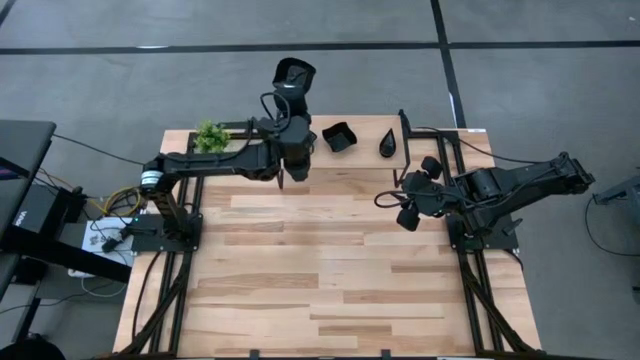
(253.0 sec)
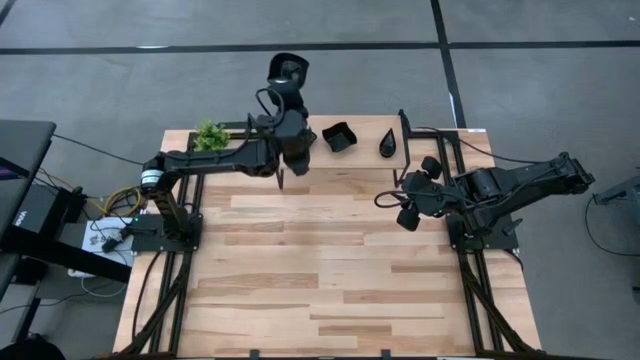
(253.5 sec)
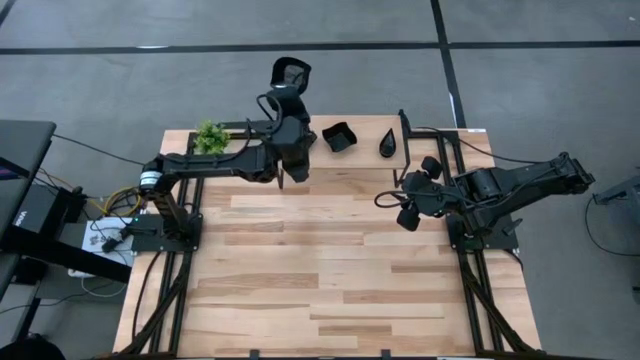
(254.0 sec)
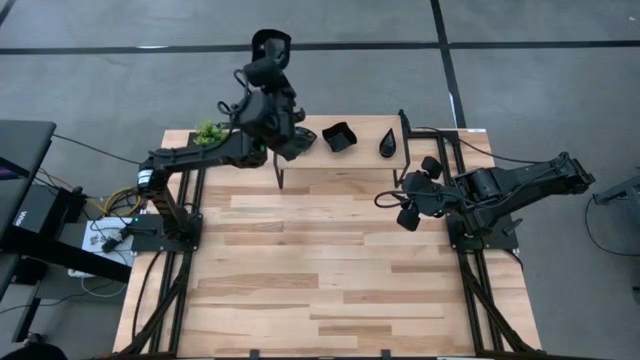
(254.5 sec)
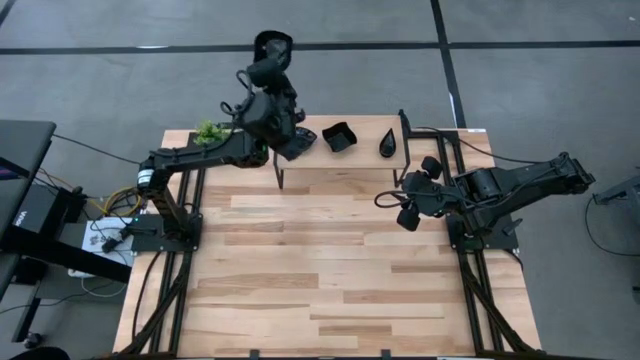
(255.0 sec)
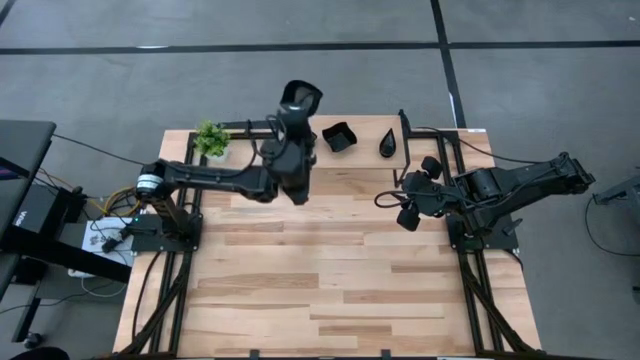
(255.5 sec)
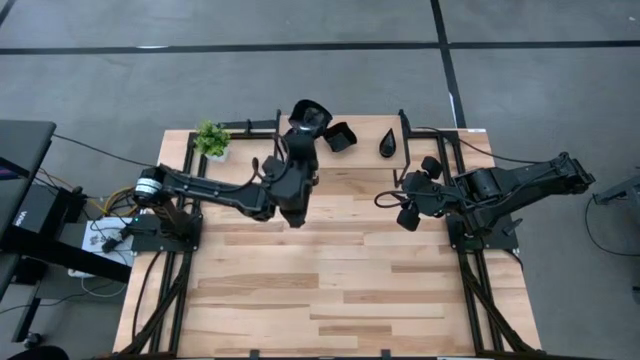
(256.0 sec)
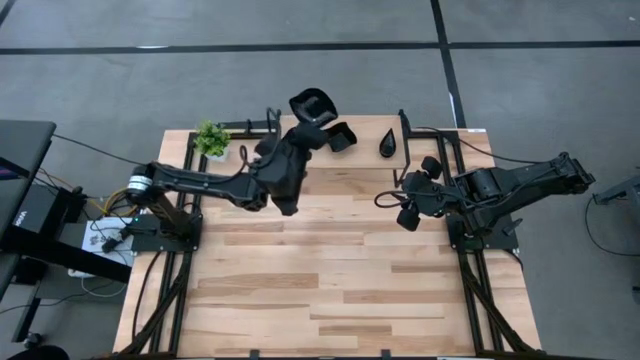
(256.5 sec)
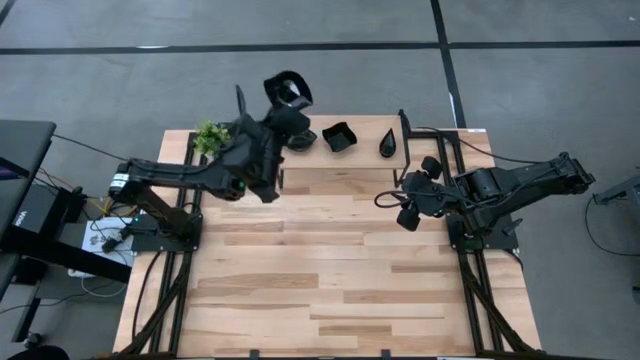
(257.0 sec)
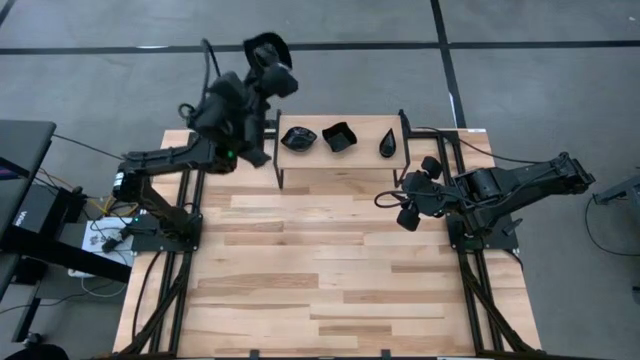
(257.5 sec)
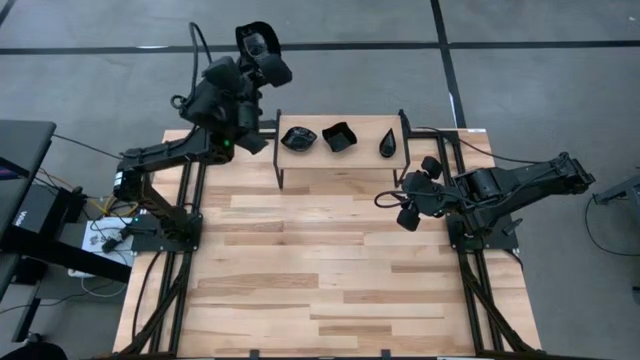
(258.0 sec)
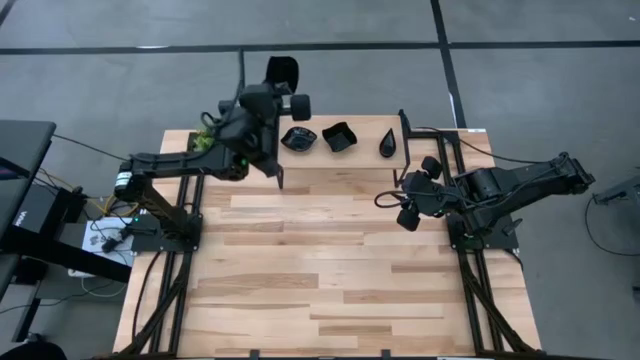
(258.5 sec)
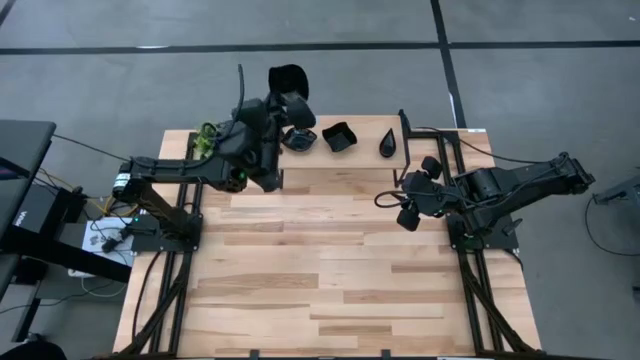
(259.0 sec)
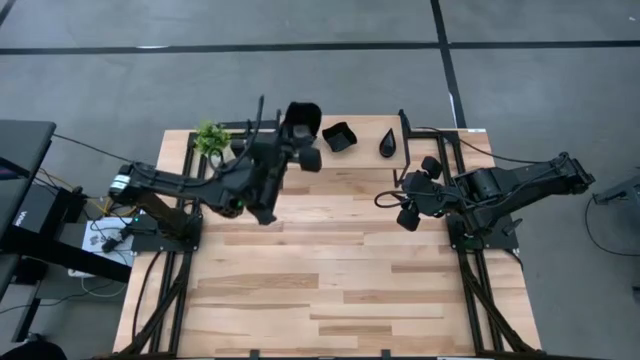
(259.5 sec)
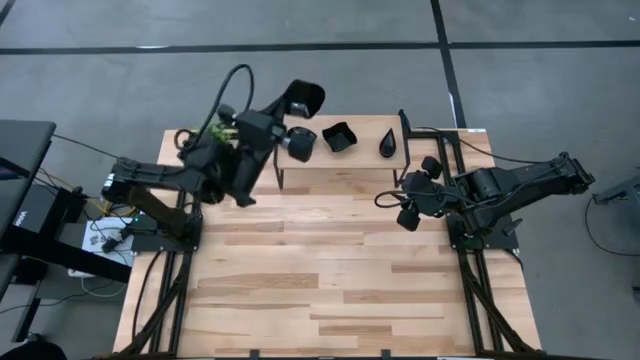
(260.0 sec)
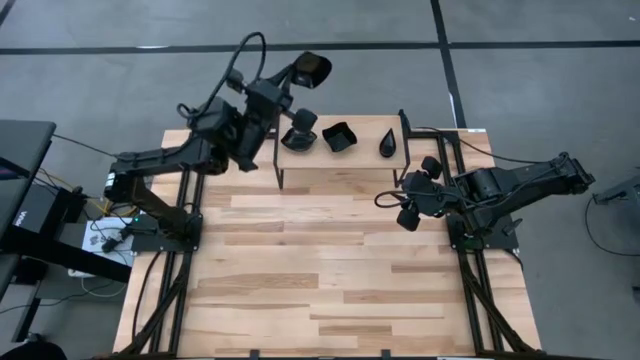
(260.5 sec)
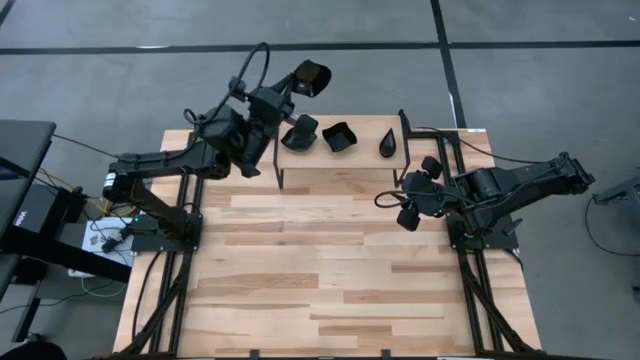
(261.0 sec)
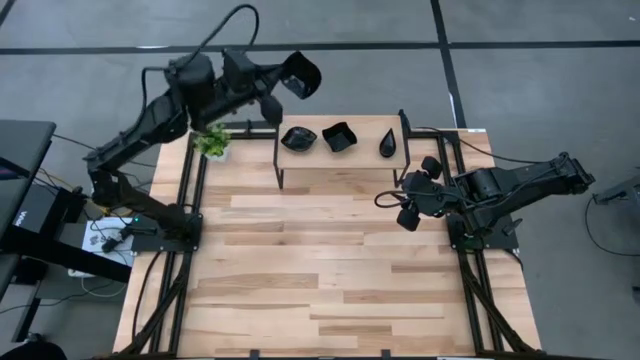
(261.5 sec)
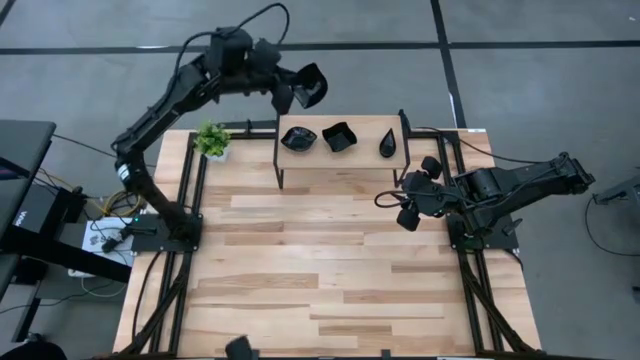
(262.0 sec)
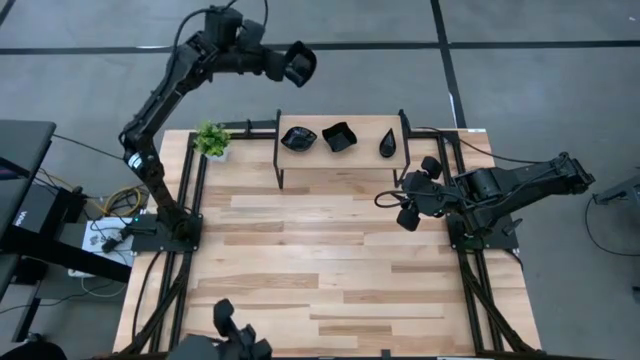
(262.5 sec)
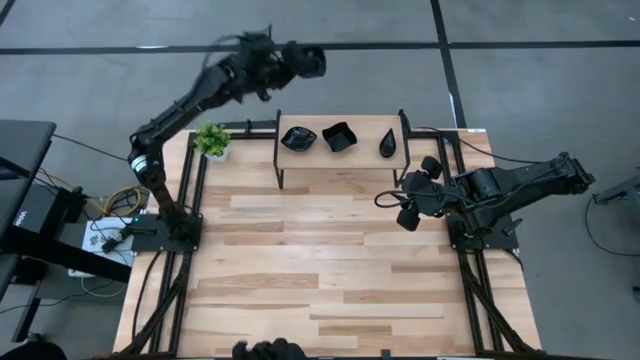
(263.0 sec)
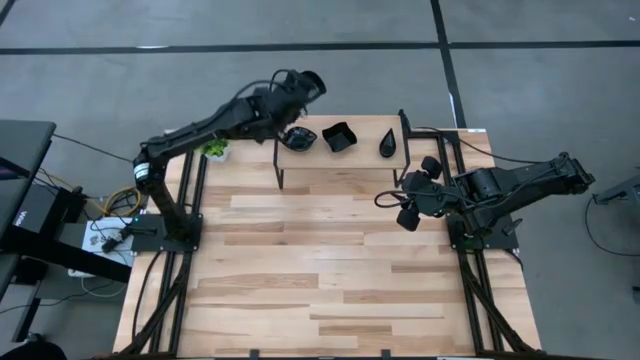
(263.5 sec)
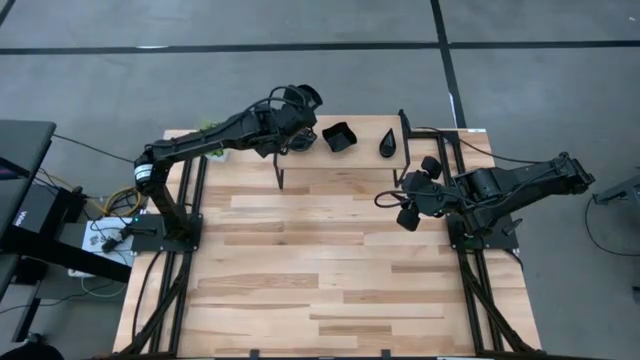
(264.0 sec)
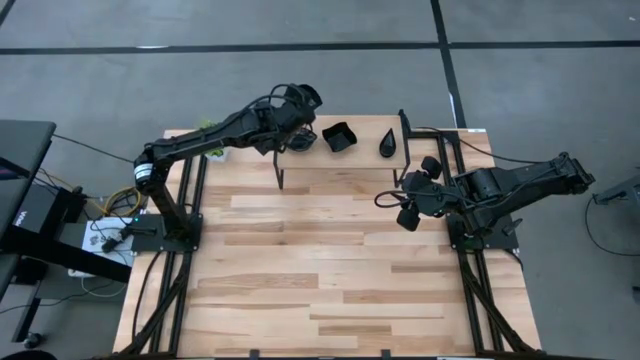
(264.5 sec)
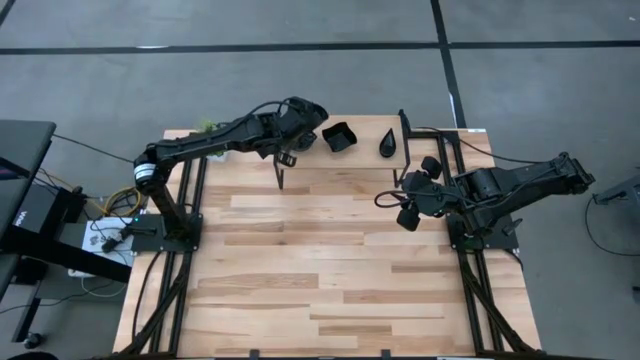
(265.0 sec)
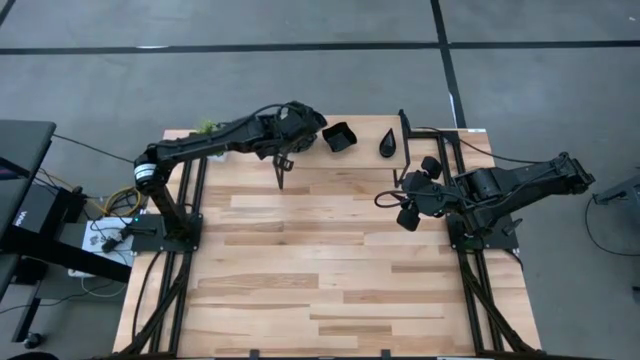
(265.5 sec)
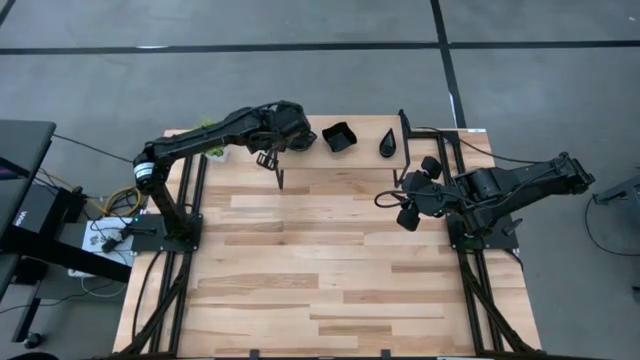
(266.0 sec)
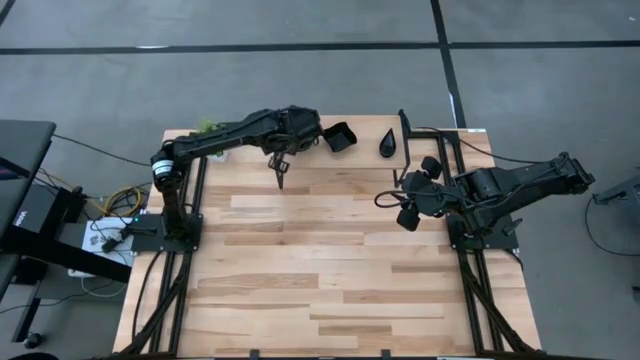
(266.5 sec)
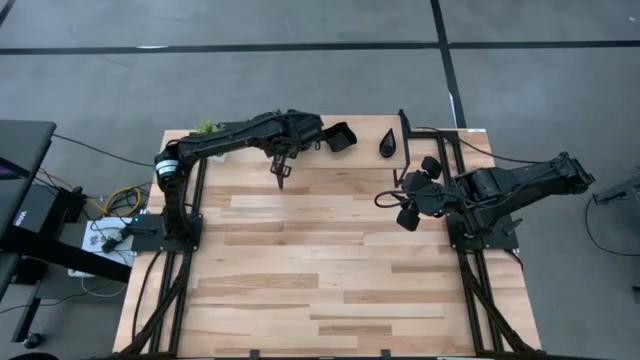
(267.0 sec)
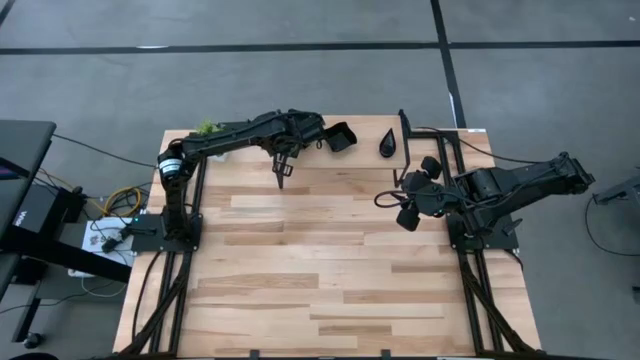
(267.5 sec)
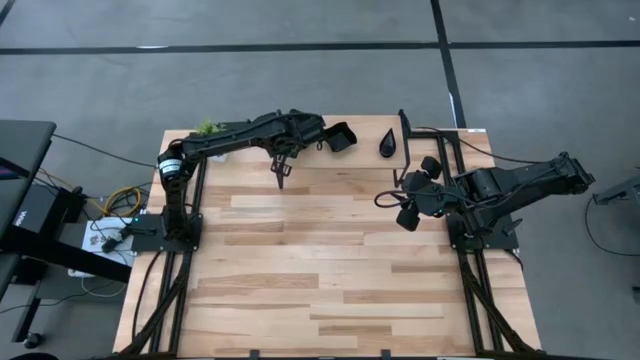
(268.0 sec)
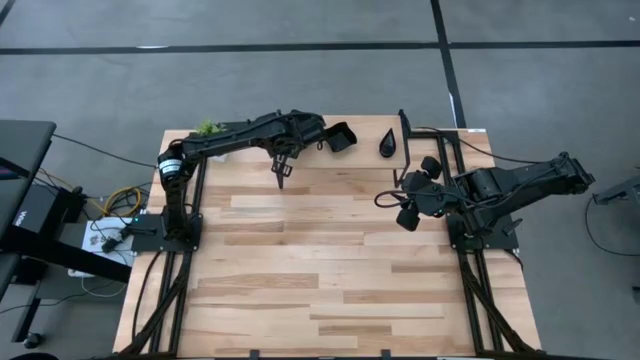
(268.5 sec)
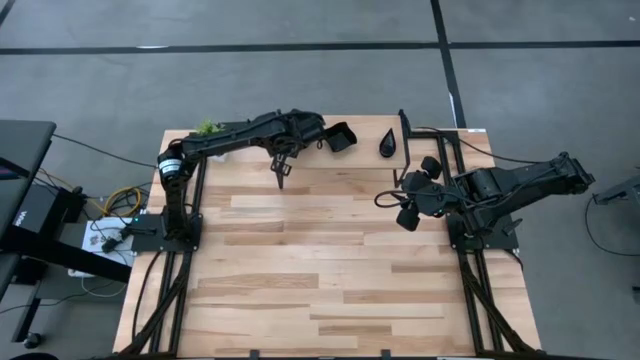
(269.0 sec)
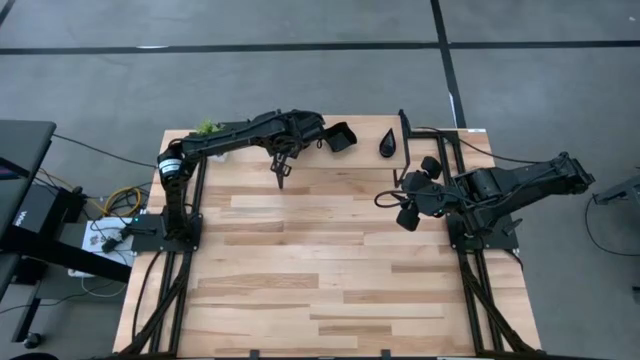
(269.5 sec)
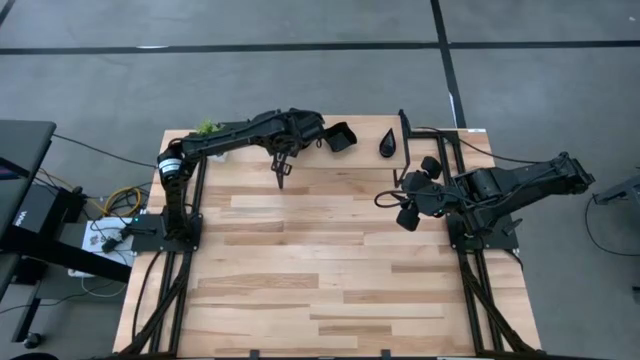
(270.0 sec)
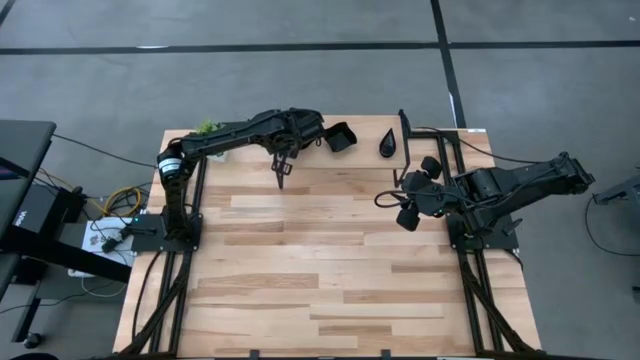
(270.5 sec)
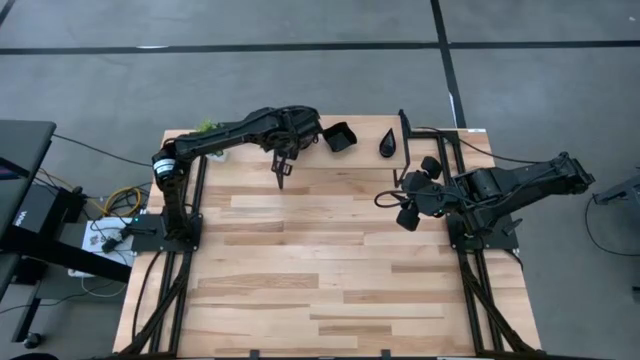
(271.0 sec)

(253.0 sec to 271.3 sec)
Task: Pick & Place Mini shaped plates
Stack the black plate on top of the black plate on the shelf

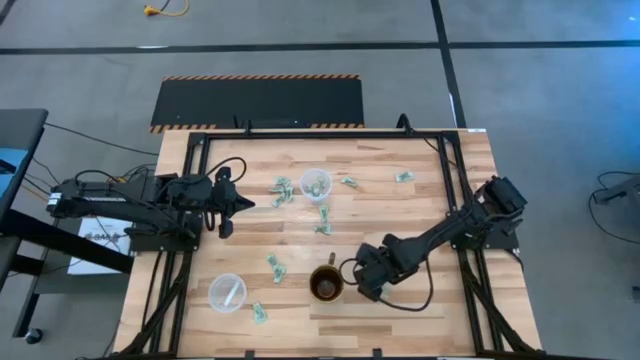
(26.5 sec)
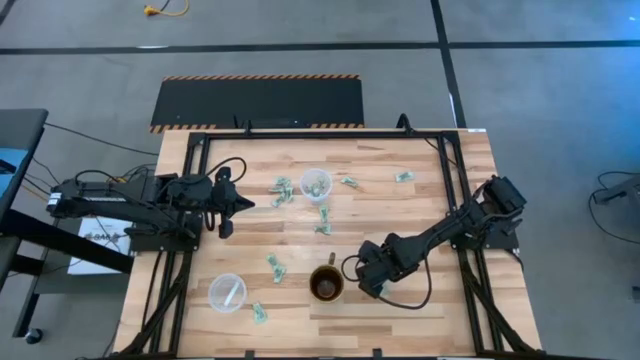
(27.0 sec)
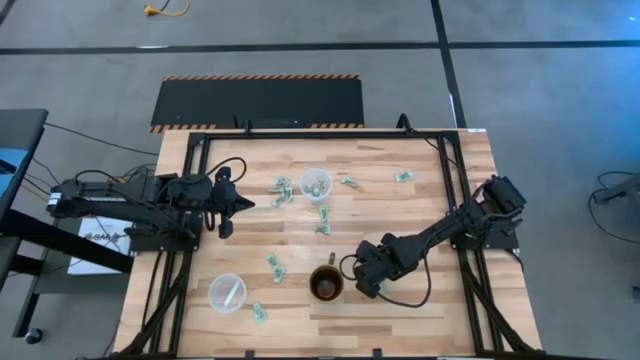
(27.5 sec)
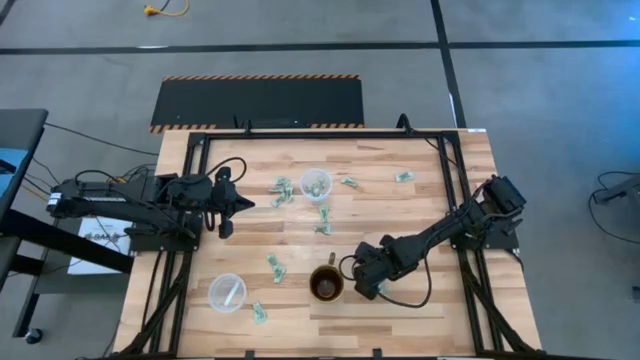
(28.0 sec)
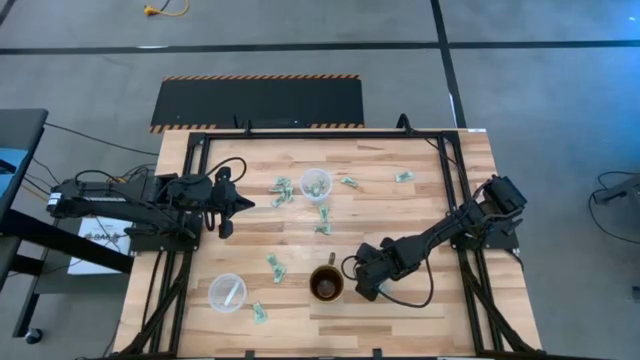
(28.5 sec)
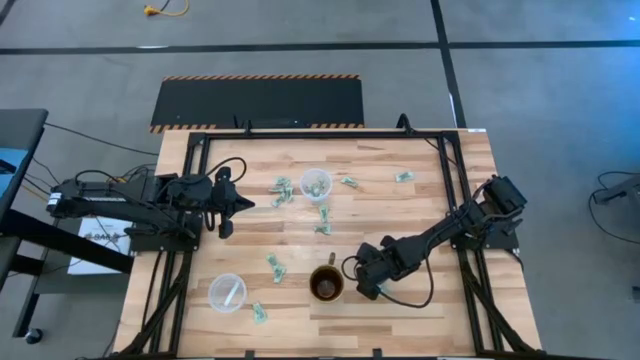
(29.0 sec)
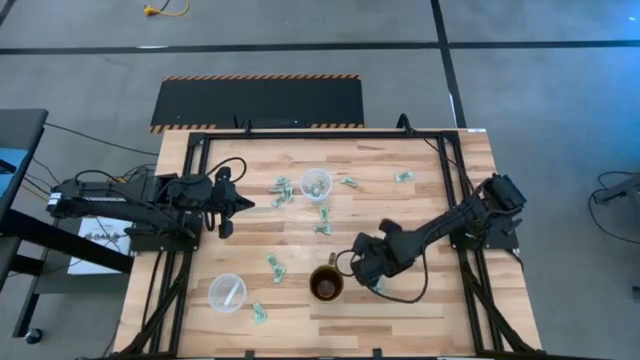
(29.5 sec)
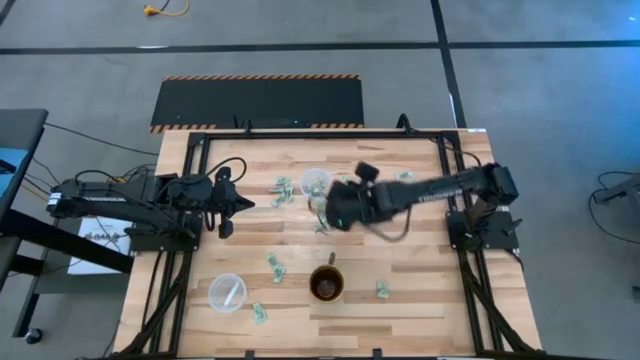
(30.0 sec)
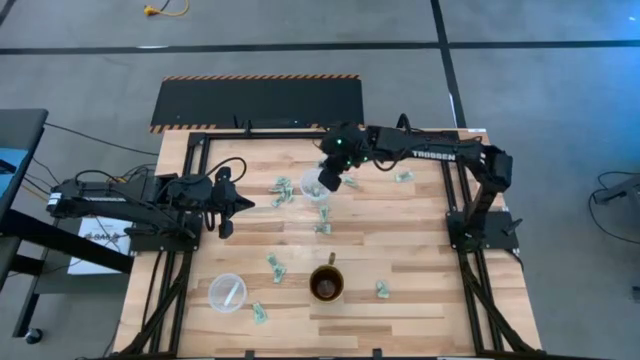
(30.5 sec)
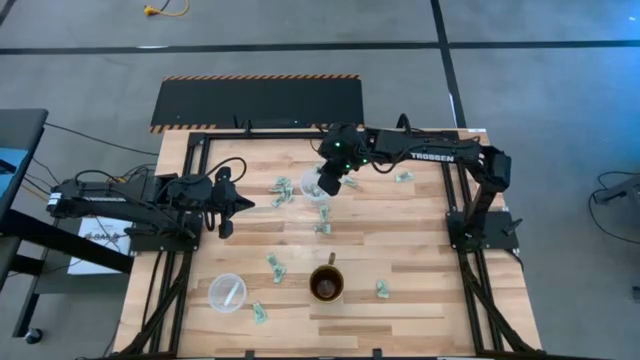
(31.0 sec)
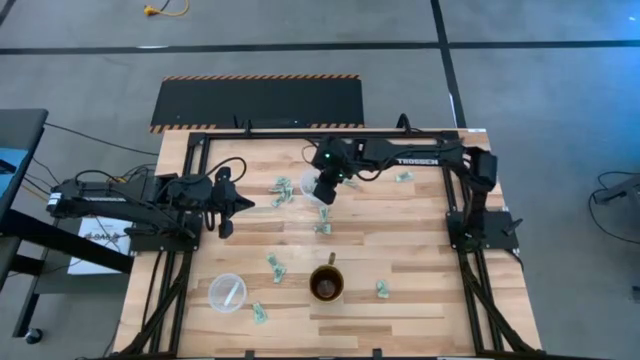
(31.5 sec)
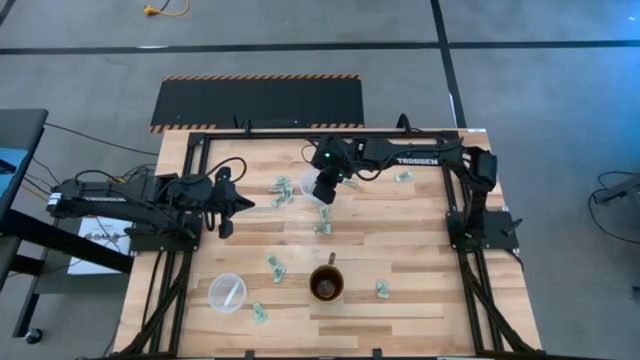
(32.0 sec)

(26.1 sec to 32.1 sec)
Task: Pick and place items into bin
Put the stevia packet into the top transparent bin
